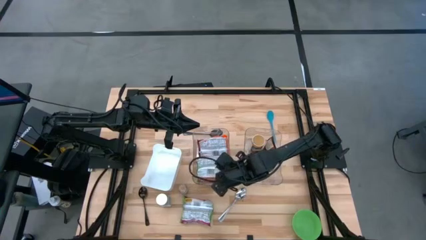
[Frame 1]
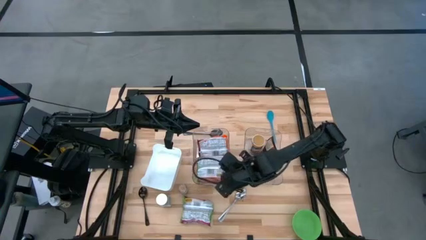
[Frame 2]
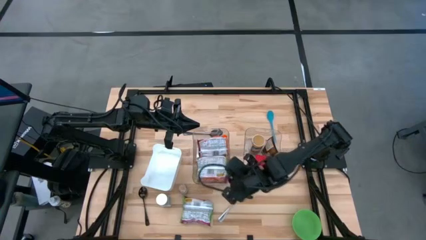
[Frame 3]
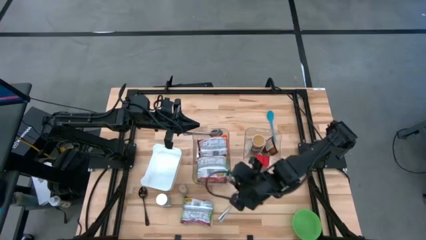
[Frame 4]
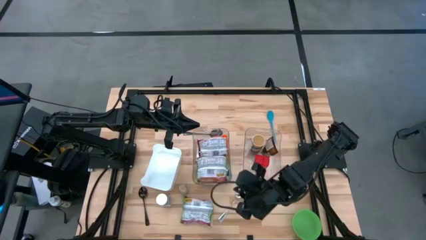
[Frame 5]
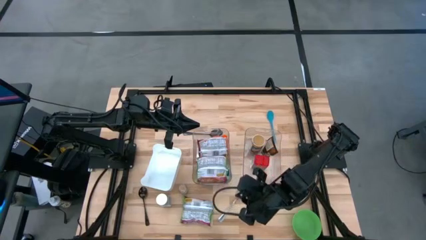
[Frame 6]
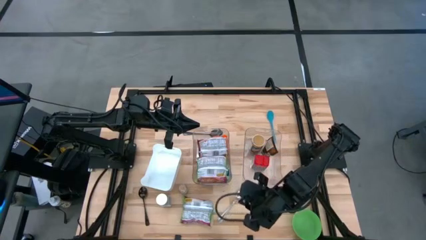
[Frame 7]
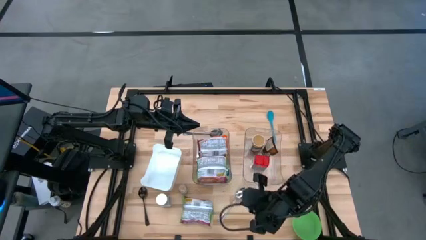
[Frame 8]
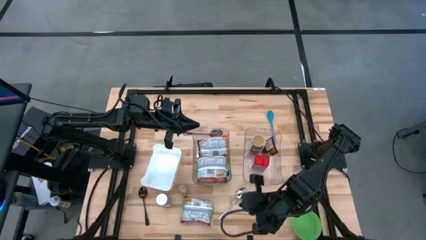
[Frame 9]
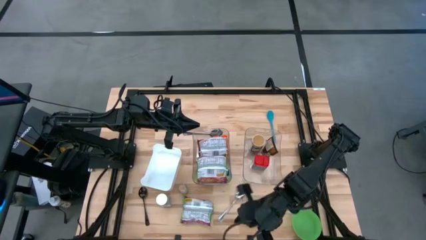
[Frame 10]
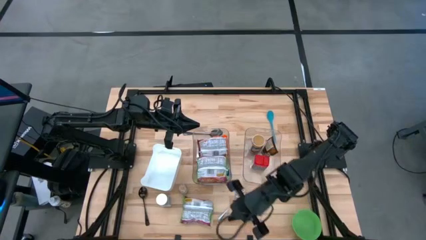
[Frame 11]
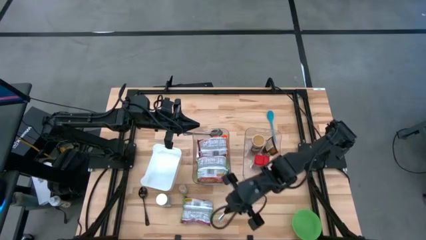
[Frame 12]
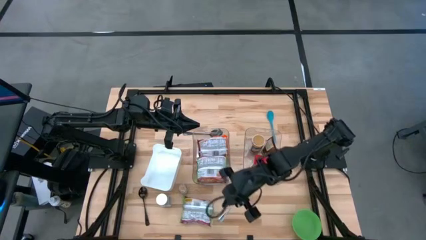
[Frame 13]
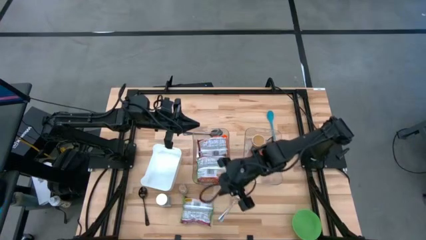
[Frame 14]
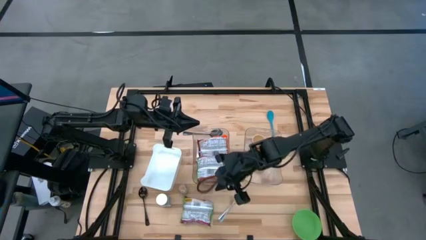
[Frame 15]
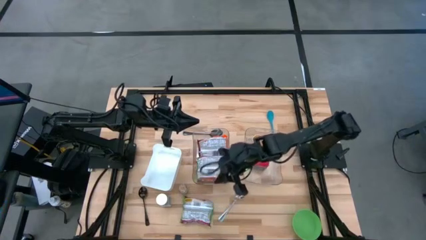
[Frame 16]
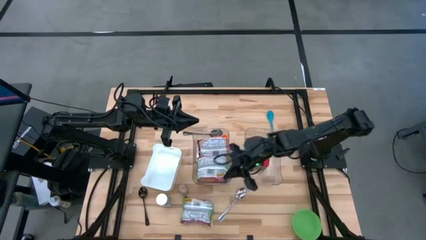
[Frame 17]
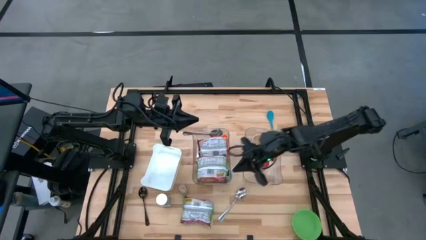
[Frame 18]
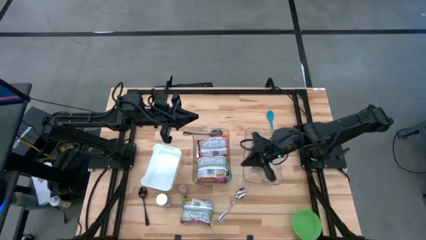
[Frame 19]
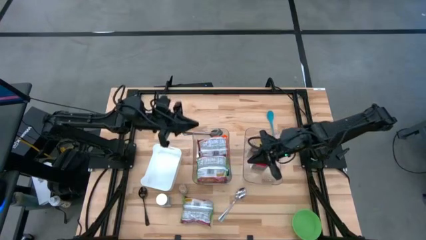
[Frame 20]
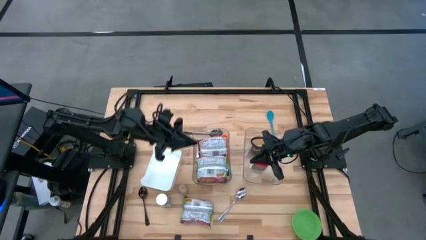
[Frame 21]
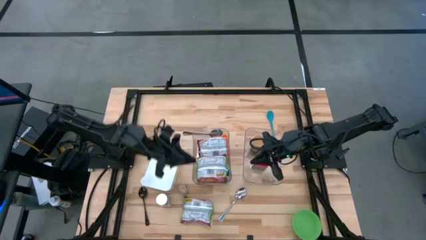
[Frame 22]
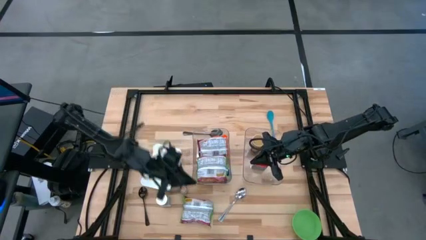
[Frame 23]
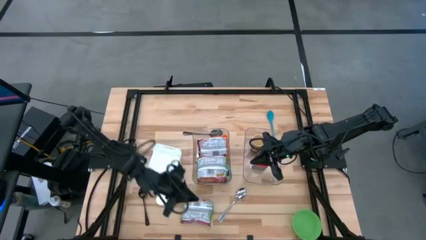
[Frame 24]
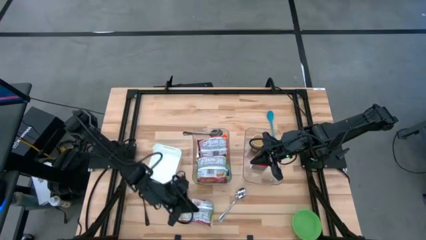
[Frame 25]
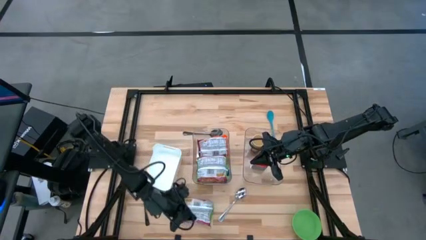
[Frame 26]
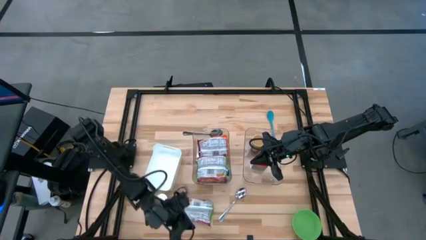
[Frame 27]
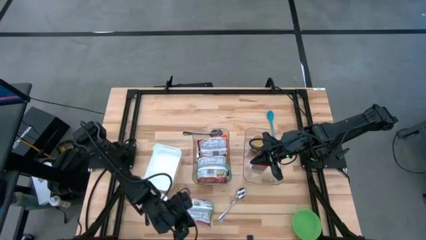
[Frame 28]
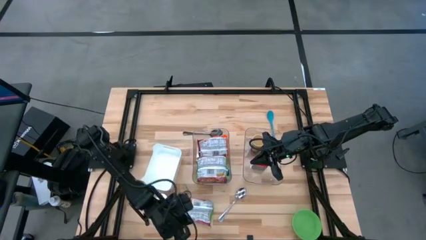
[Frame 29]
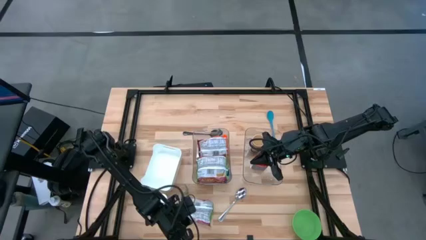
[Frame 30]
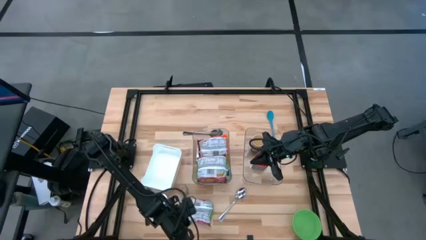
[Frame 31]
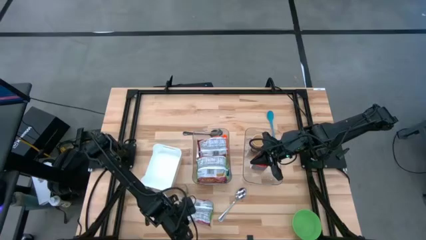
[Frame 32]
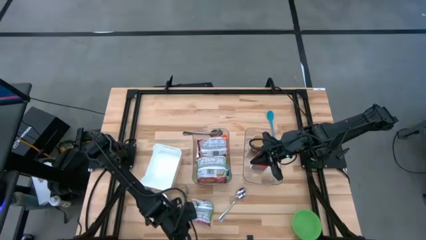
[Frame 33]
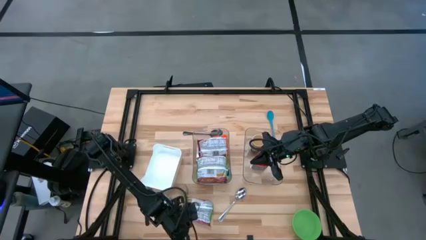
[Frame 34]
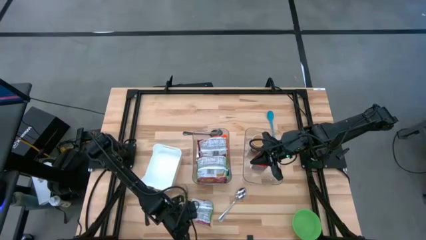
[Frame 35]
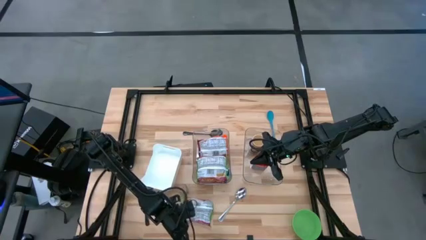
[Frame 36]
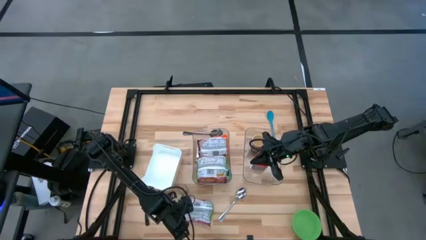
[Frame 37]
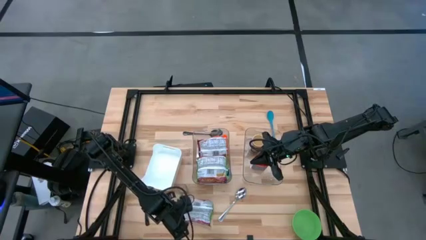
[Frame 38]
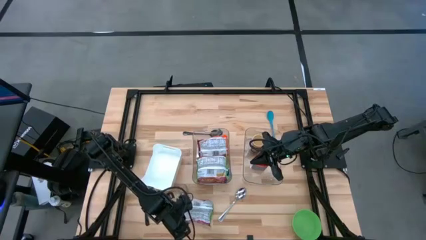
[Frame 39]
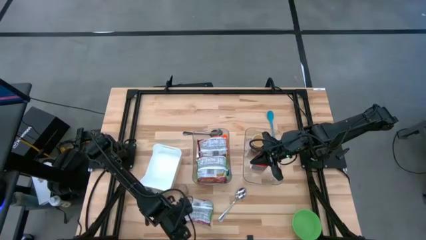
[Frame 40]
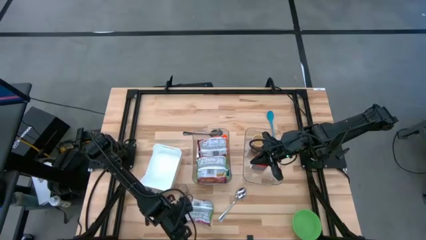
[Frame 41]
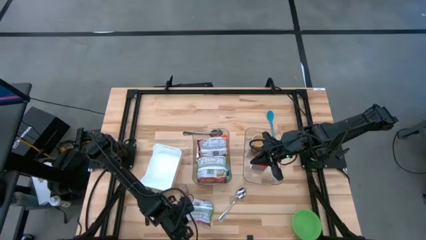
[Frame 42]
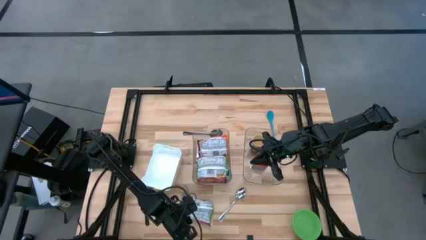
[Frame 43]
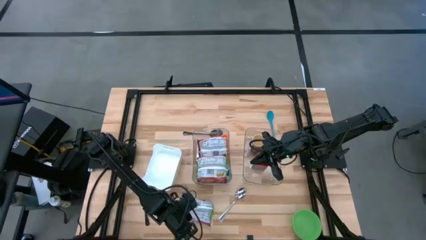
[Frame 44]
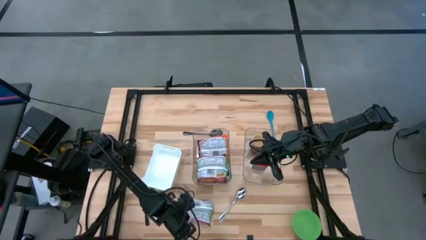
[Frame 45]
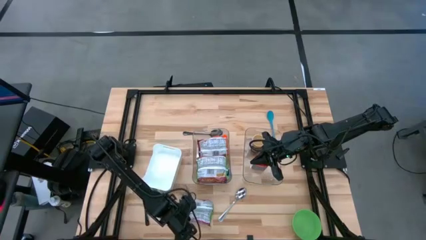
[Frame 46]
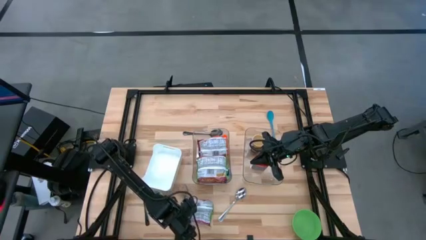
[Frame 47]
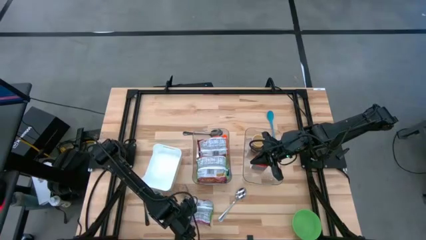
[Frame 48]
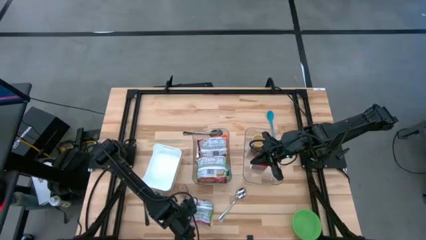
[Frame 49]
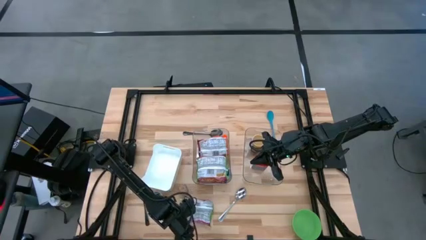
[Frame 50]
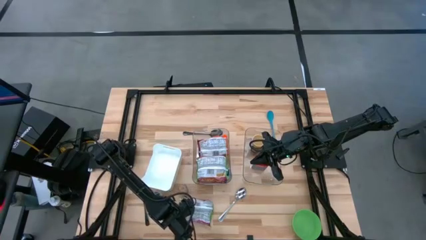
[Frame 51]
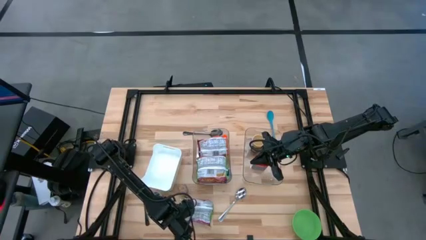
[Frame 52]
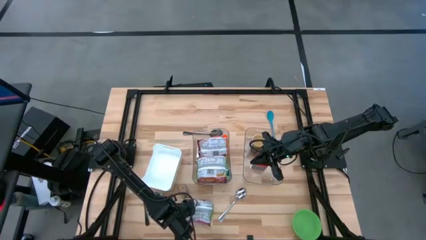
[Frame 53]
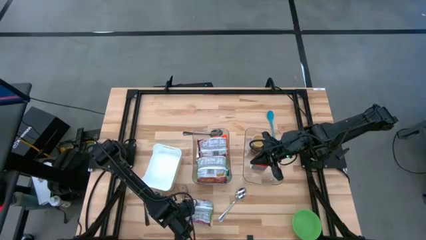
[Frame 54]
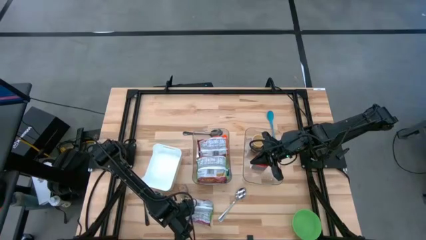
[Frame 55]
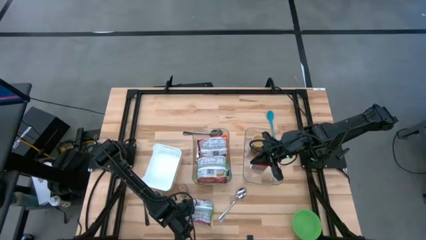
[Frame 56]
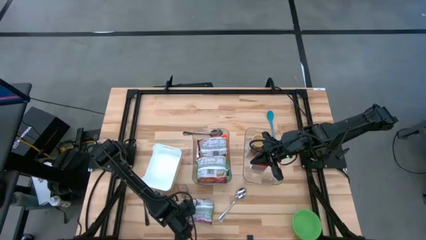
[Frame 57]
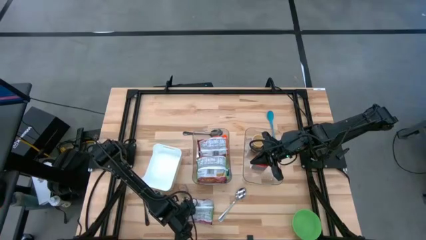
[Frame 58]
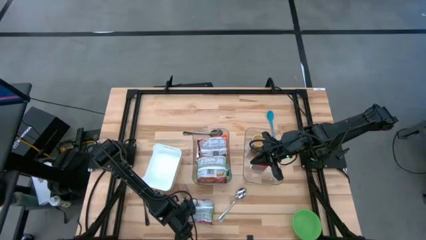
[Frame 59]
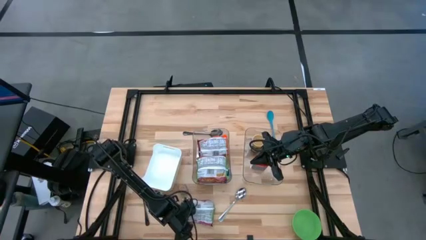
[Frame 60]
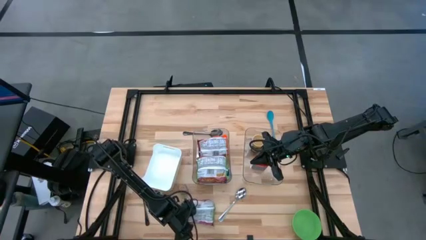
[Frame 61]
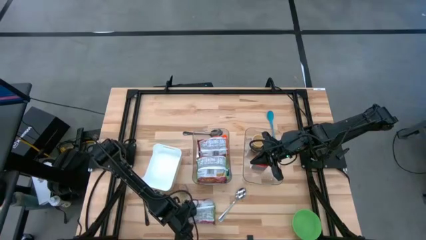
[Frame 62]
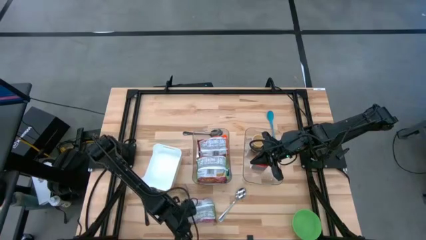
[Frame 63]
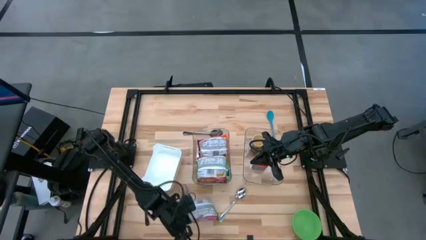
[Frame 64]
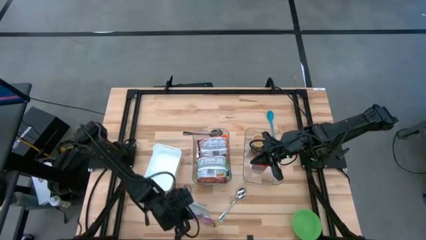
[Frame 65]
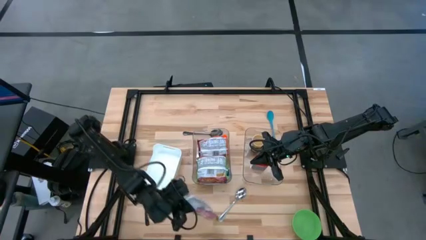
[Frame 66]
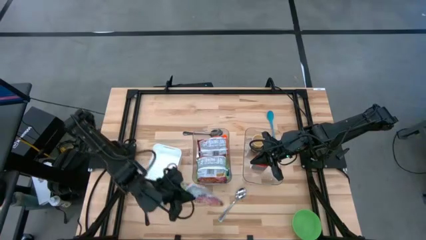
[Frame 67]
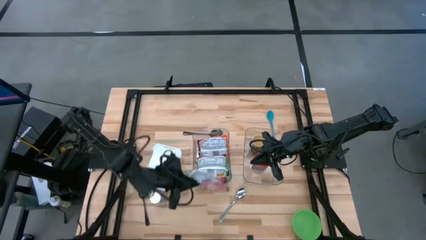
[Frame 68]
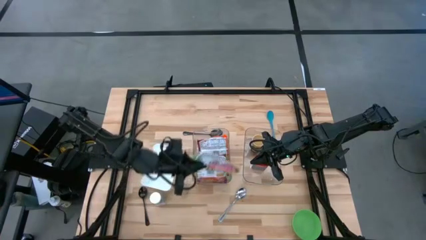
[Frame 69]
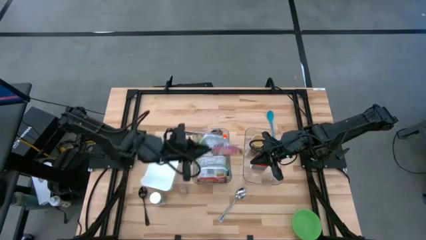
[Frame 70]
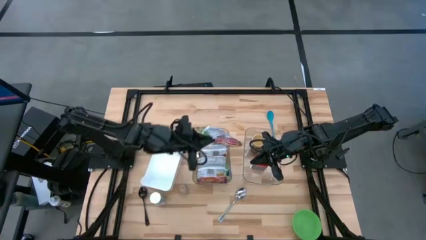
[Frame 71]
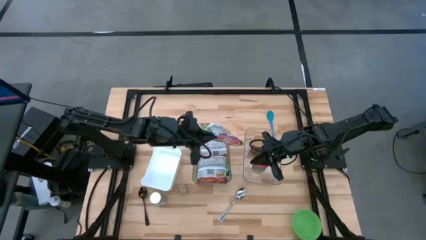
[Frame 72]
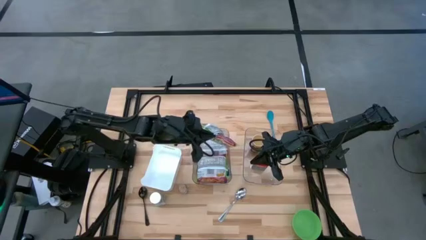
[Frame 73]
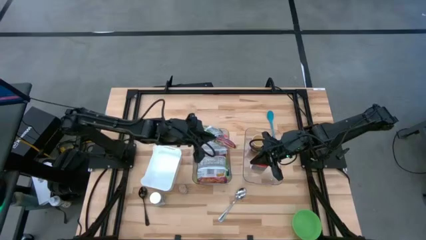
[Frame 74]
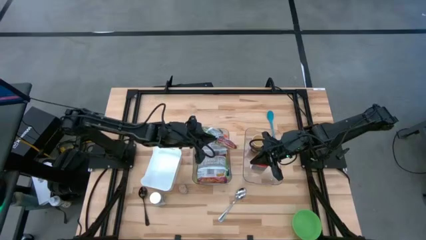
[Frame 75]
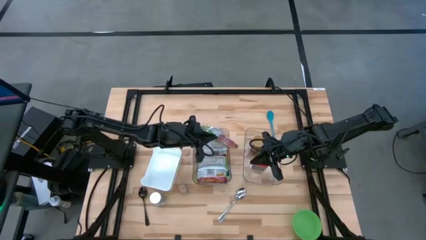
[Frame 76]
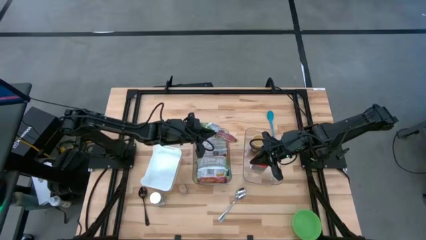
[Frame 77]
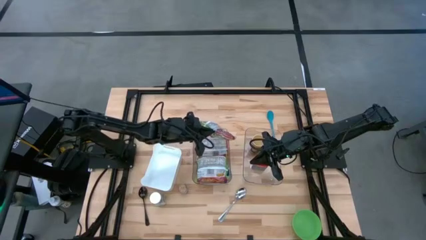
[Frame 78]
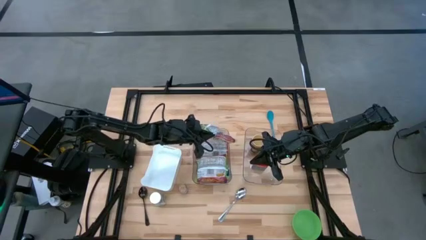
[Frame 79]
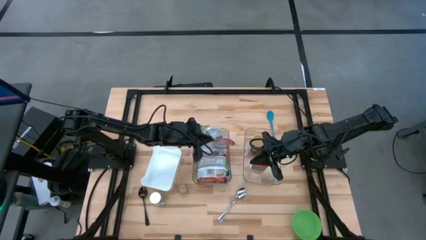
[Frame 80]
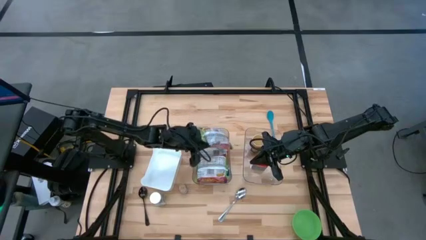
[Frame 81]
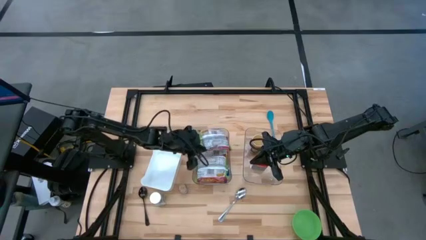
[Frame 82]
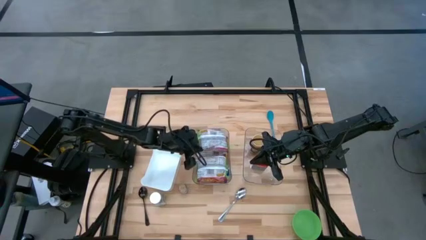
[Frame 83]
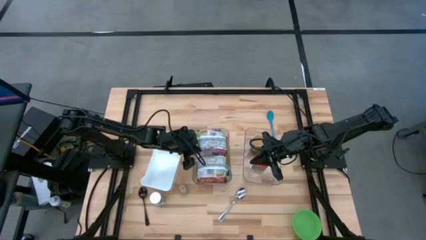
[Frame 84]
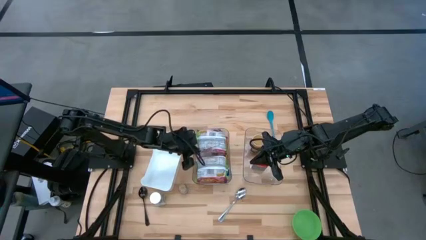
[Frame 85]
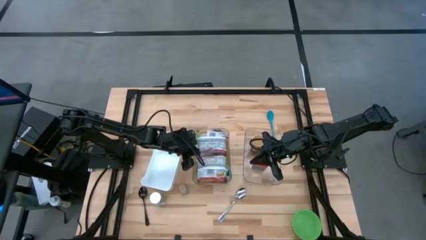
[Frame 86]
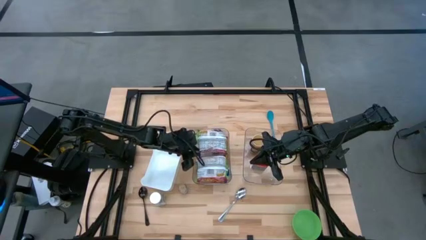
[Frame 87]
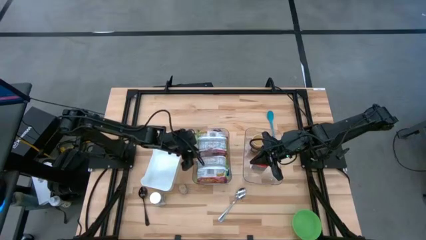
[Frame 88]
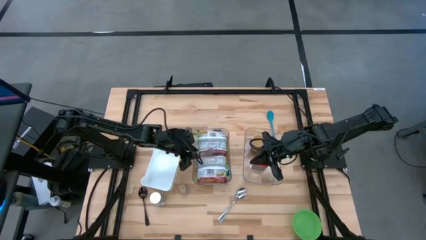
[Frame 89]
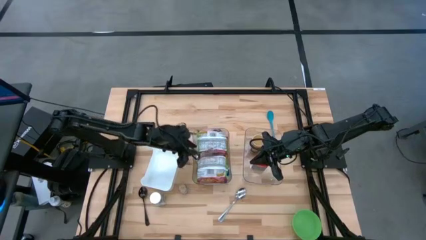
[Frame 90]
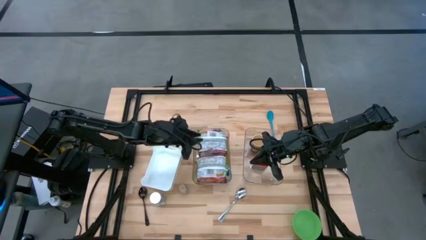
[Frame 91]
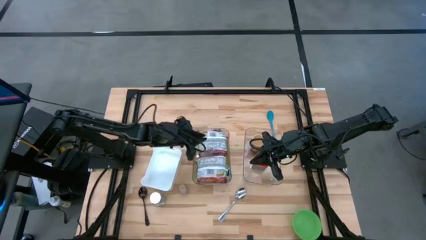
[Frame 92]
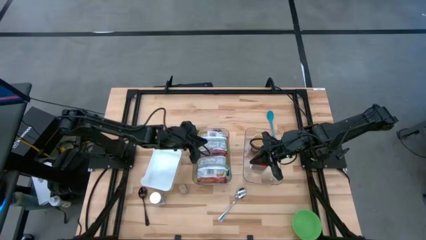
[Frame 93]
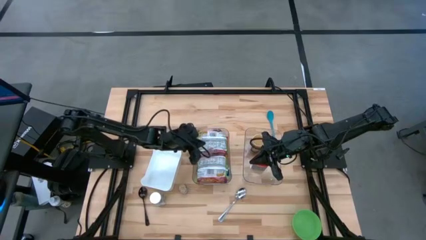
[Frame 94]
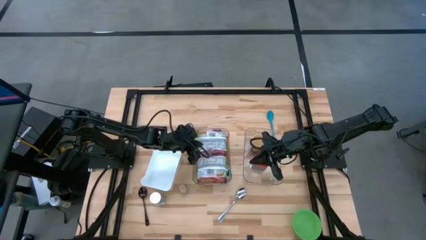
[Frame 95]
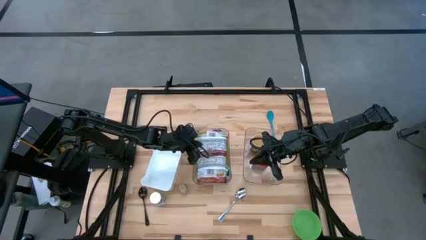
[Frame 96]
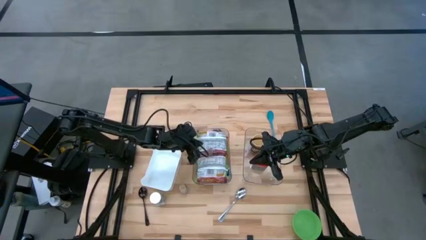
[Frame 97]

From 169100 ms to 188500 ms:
Task: Pick & Place Food Item
Put the green noodle pack into the left transparent bin
